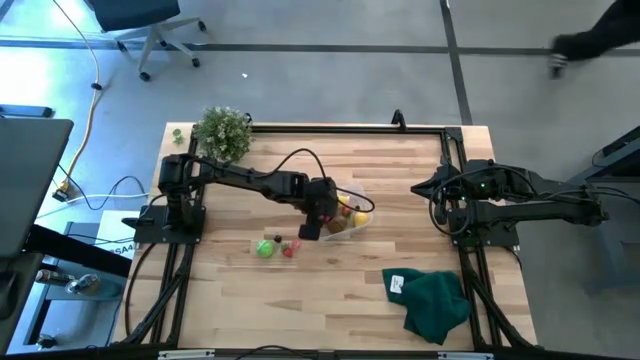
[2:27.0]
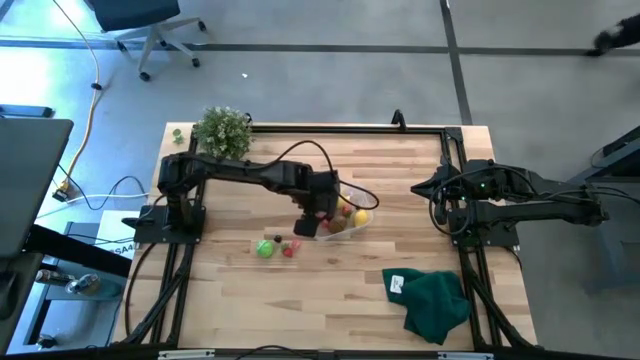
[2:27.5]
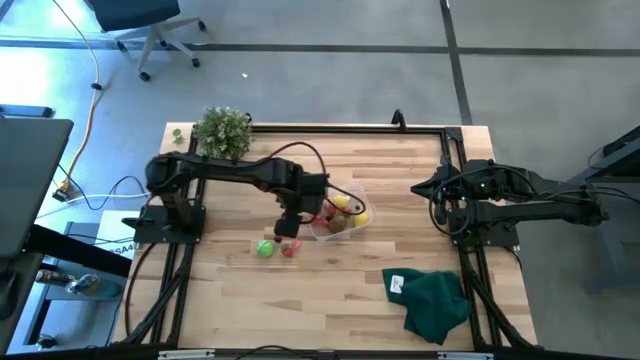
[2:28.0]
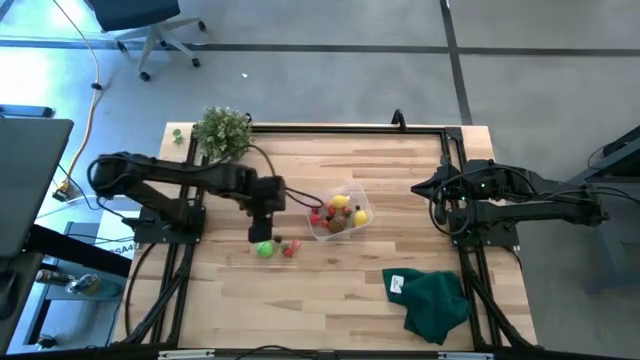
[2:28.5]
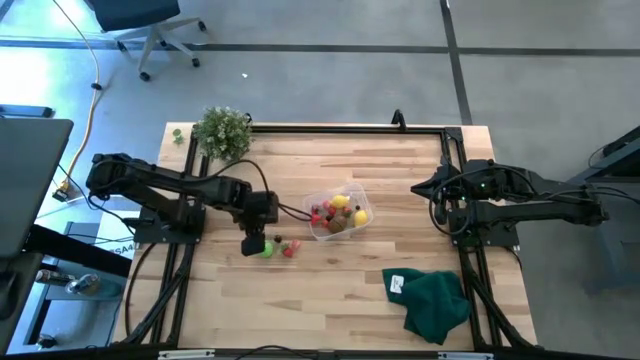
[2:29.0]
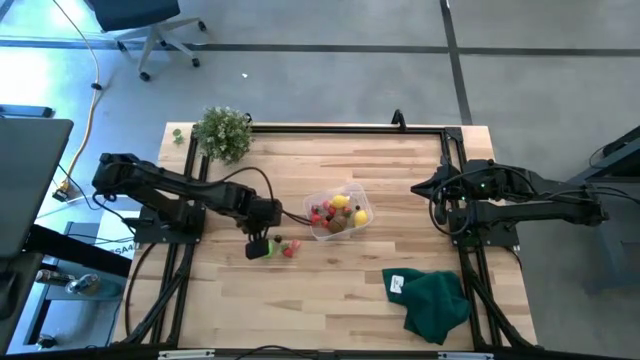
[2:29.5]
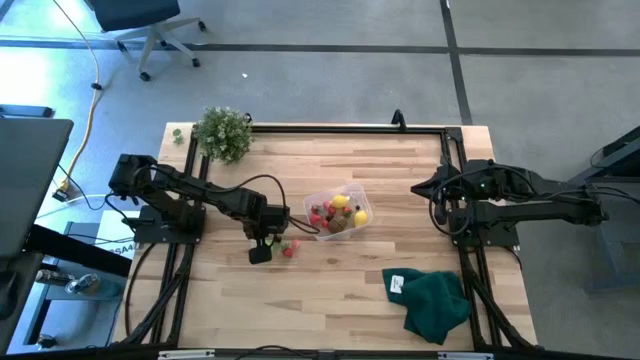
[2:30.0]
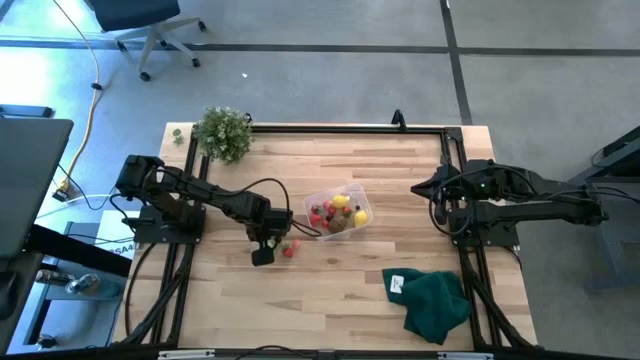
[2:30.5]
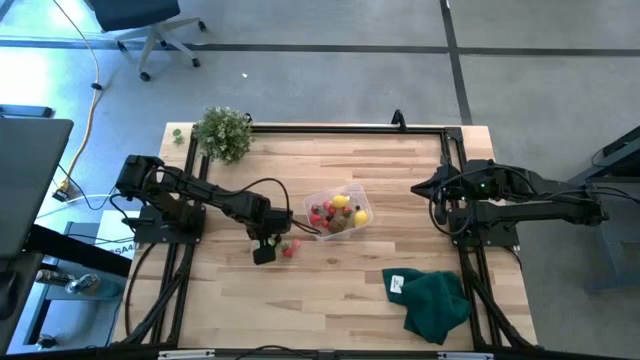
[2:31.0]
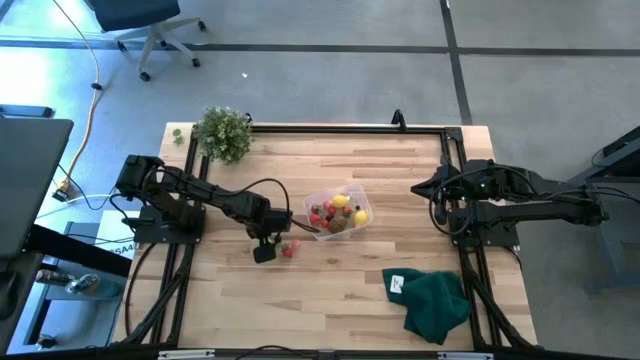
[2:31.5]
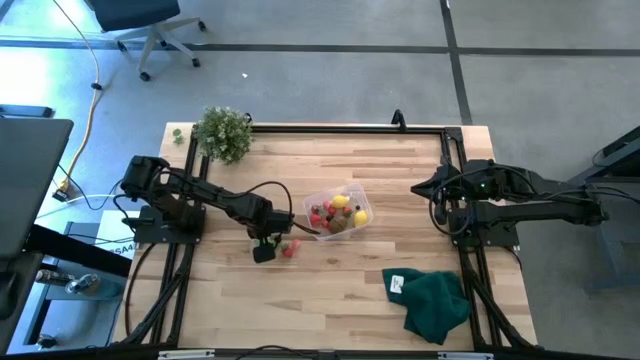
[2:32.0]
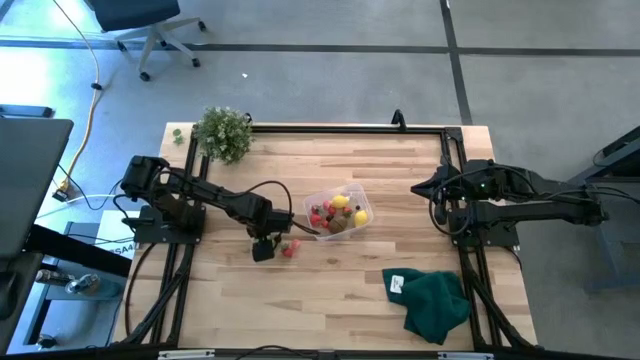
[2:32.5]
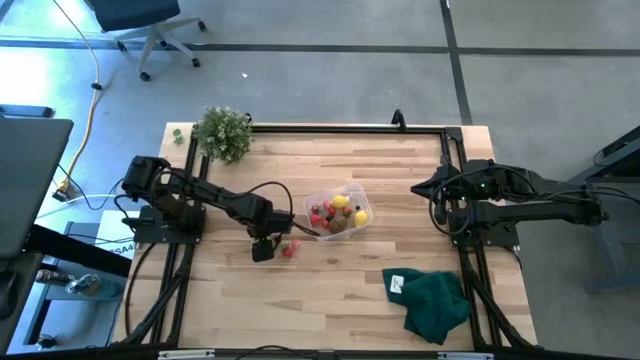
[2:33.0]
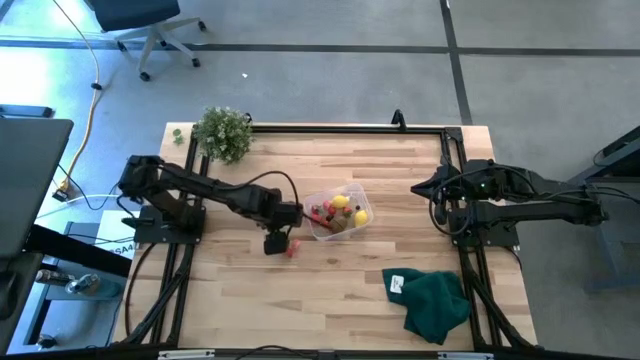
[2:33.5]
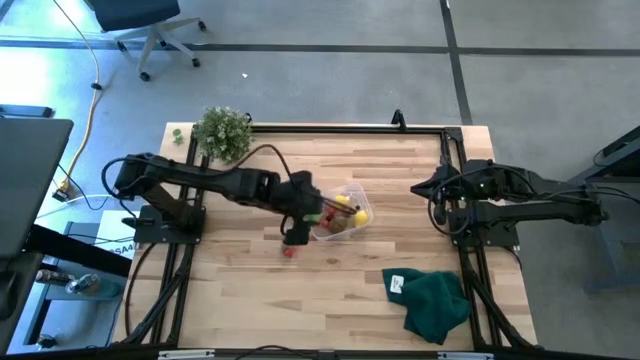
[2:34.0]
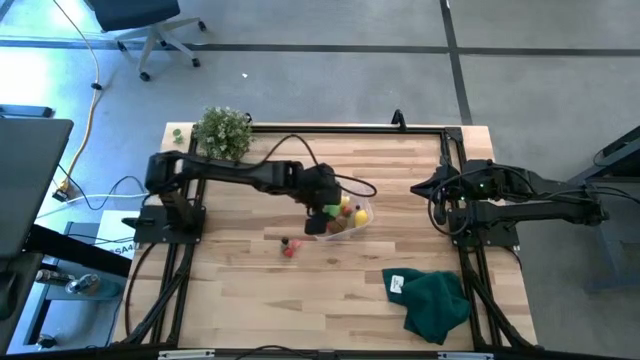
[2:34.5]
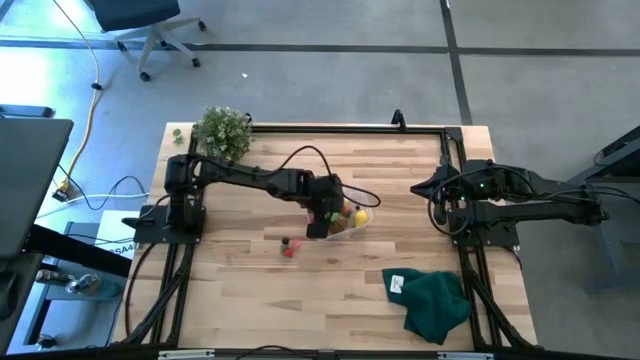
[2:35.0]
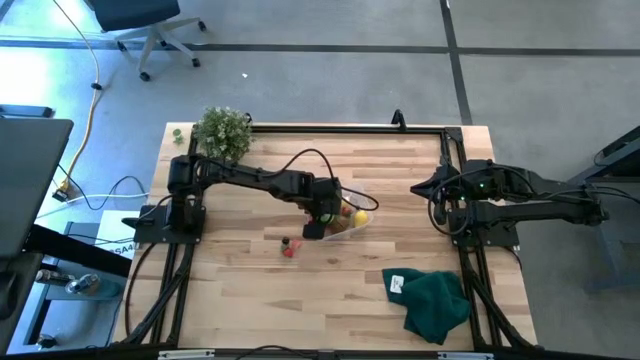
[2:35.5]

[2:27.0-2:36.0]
Task: Pick and placing Produce into tupperware
Put the green cabbage into the transparent bin

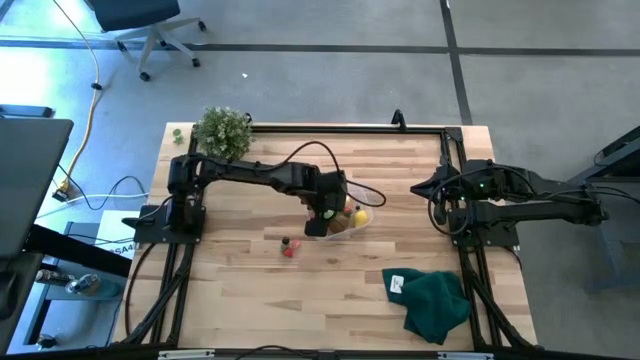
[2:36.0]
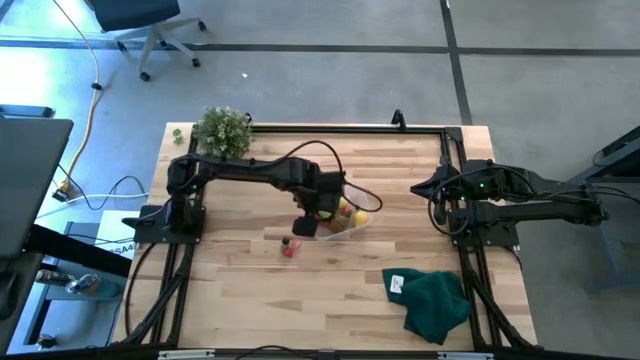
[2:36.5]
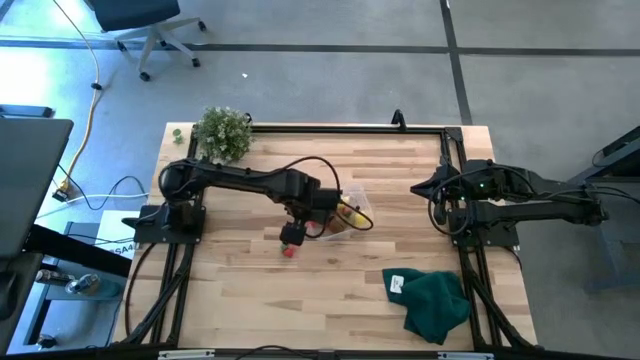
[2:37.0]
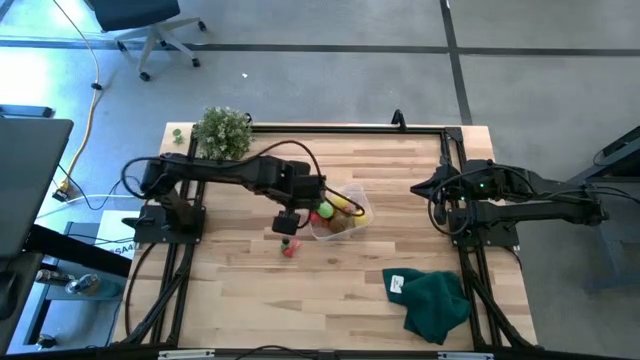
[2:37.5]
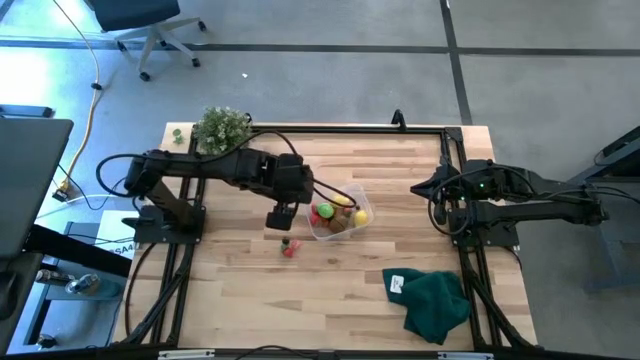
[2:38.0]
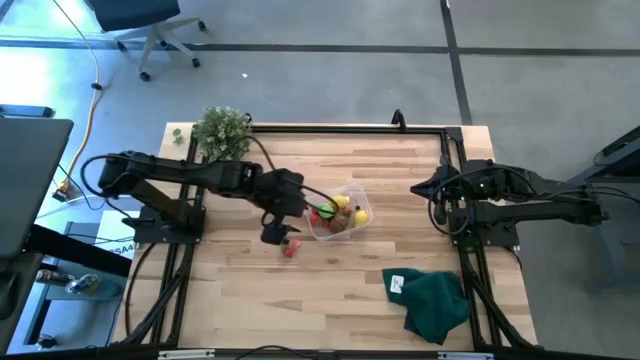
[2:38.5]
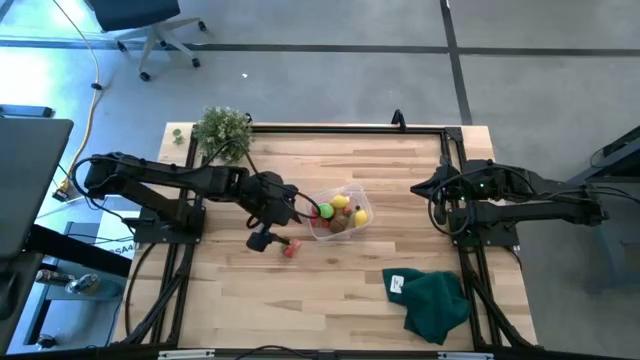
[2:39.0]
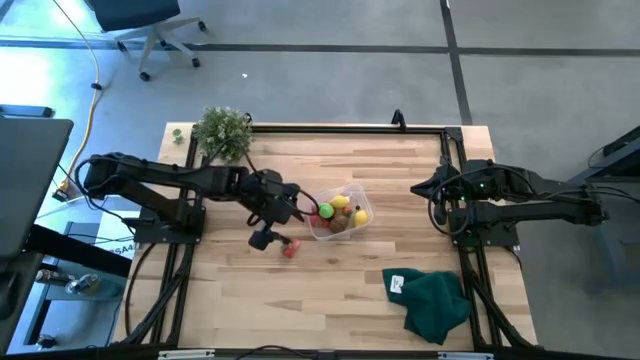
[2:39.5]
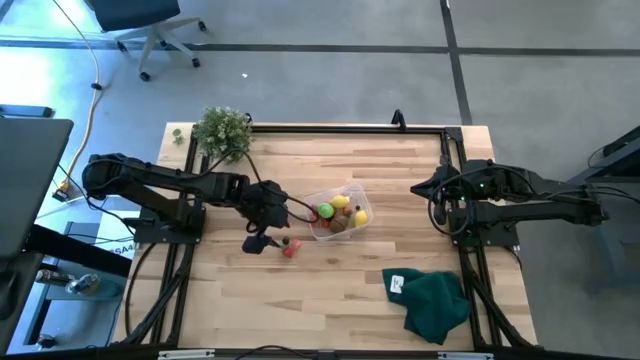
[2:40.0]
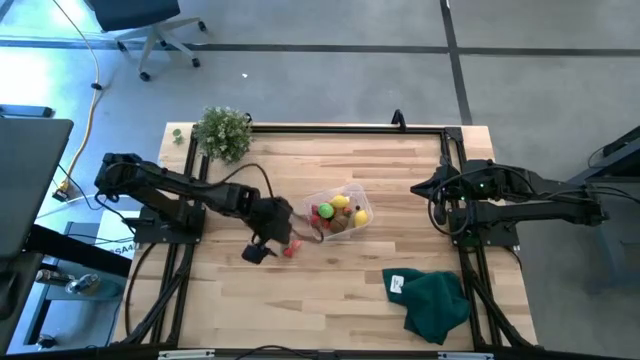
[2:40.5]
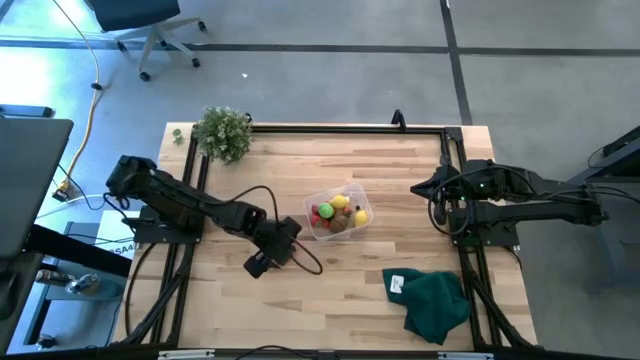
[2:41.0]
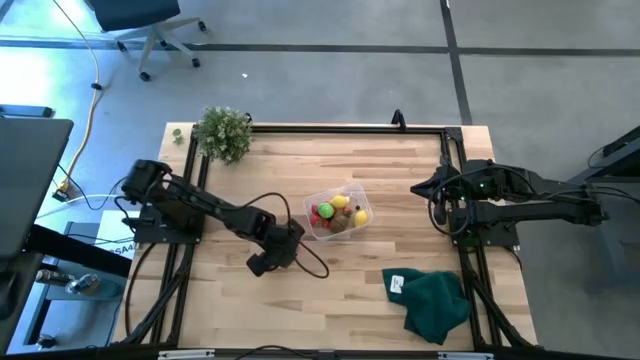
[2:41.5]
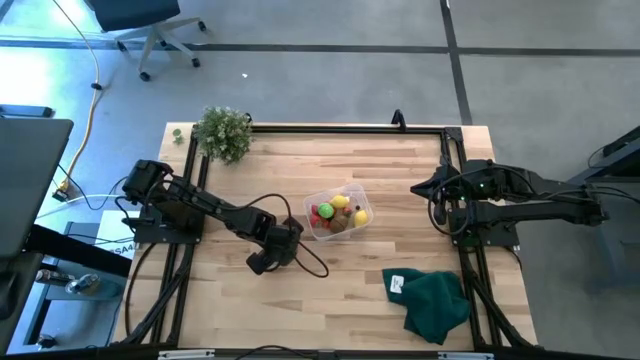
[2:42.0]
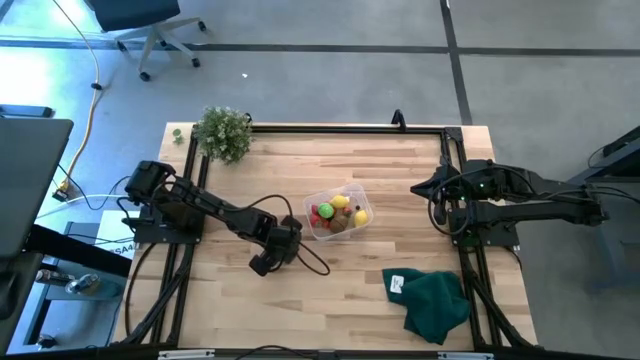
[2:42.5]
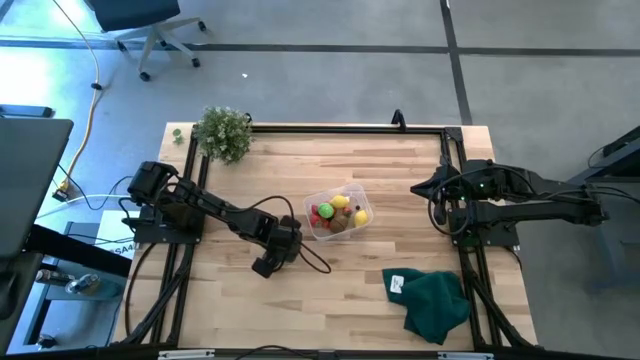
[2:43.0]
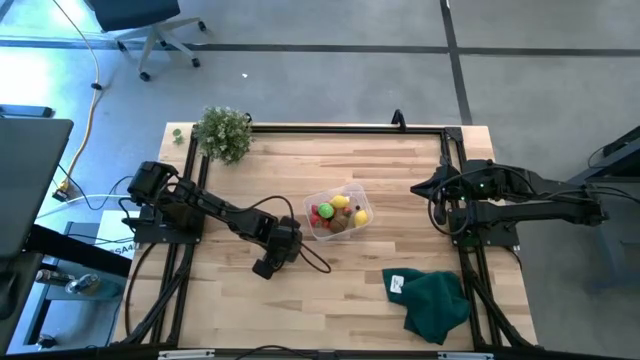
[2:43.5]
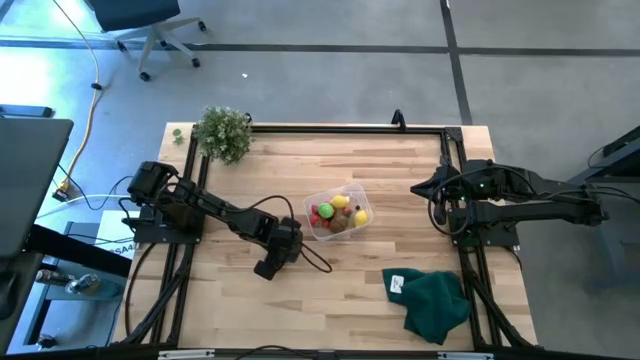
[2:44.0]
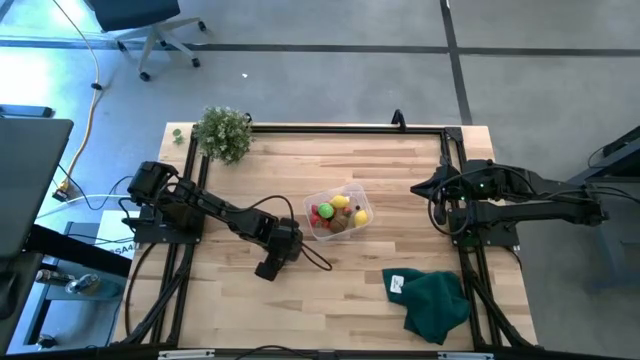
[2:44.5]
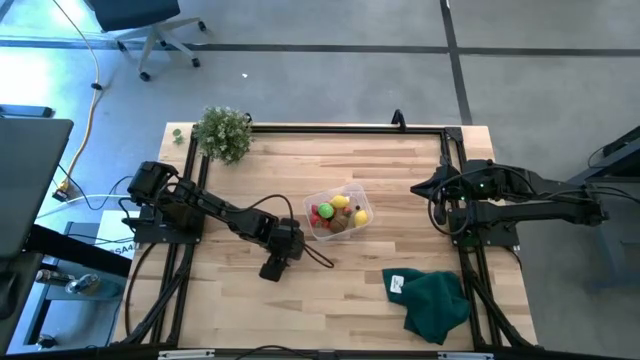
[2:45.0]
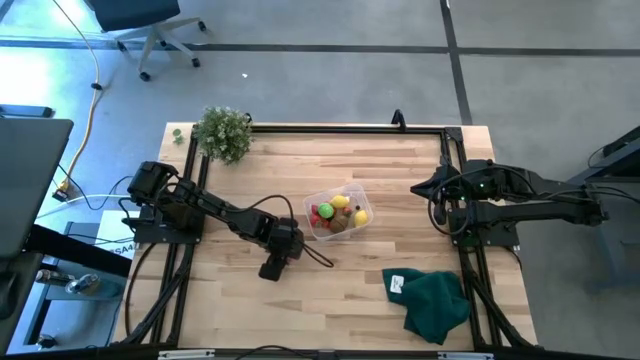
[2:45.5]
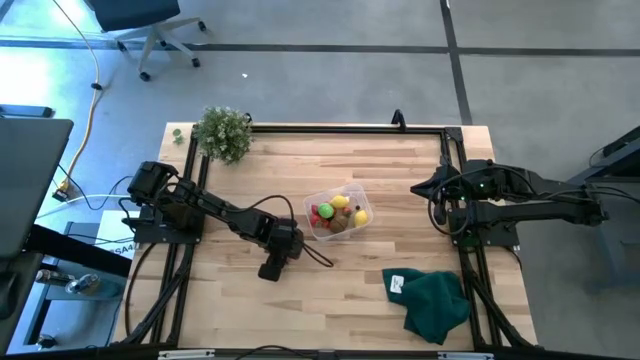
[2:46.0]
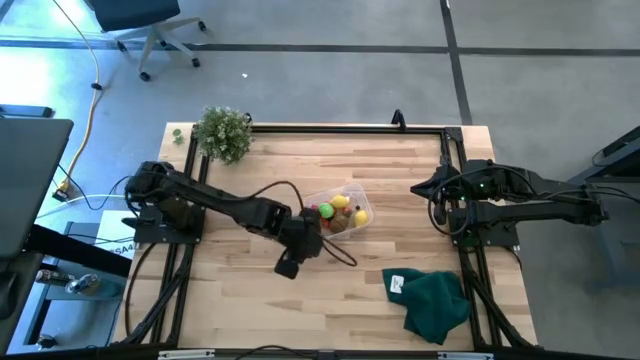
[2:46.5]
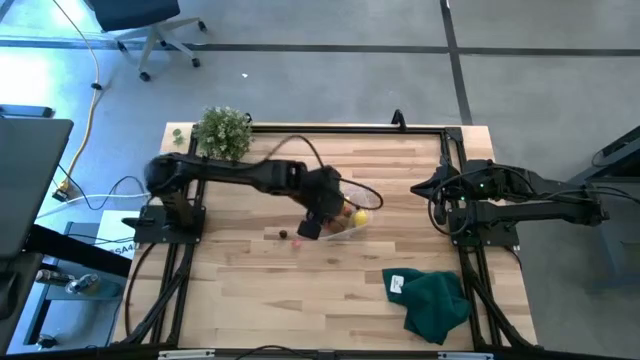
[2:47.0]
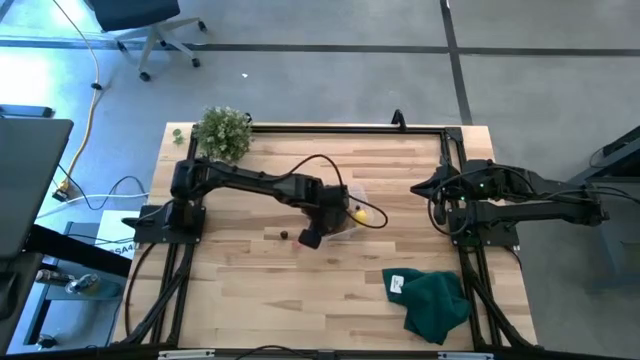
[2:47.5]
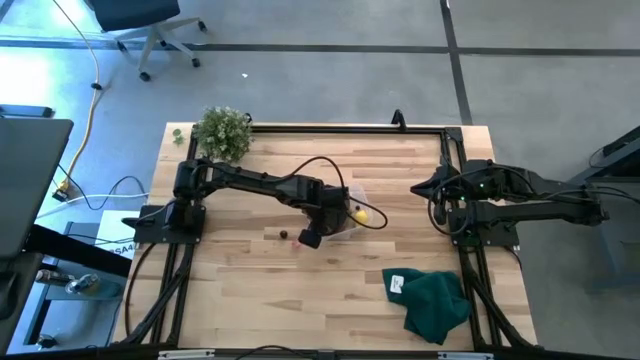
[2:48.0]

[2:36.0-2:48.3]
Put the red strawberry into the transparent bin

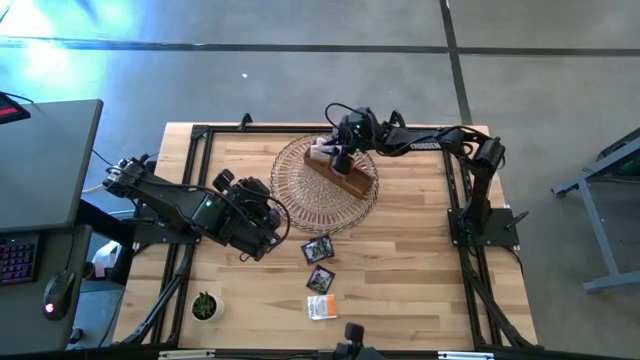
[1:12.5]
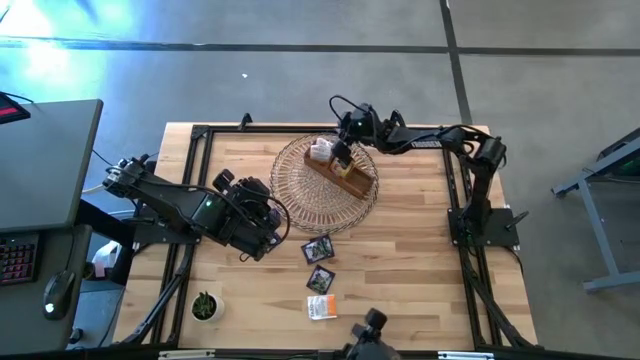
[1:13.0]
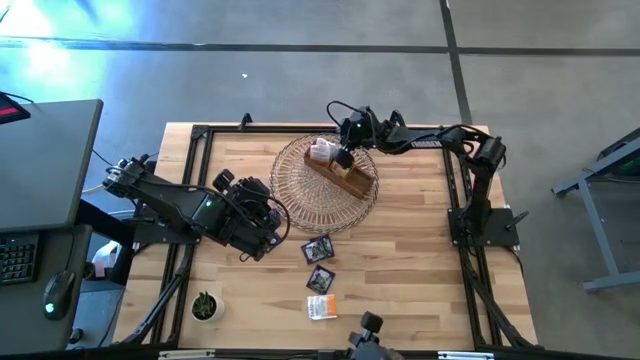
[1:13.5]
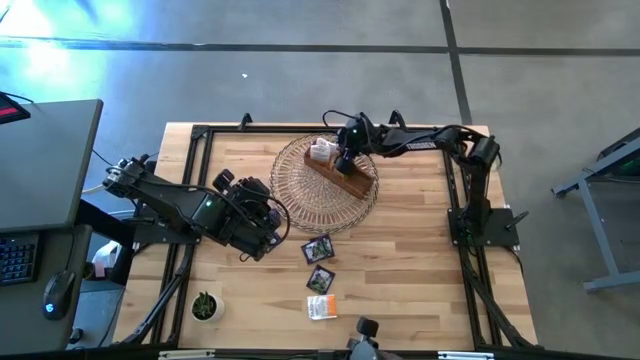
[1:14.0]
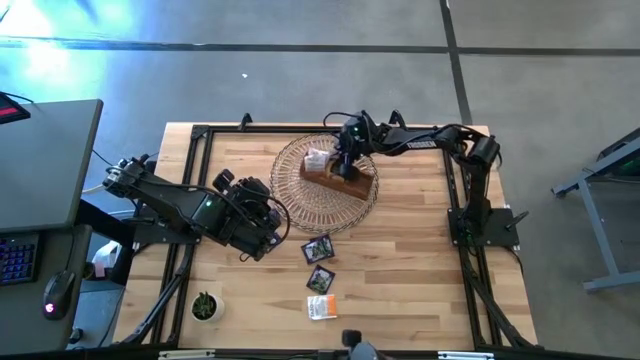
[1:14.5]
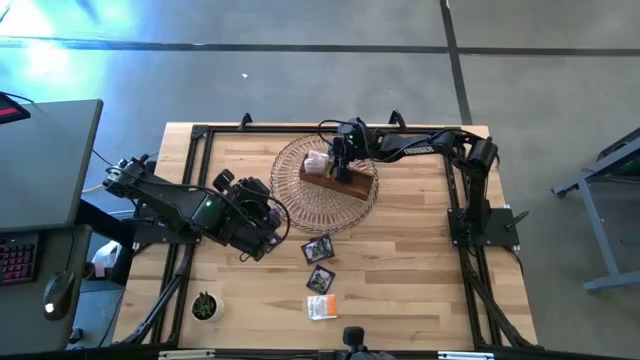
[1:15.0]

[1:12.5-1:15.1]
Task: Pick & Place Tea
Adjust the wooden organizer
